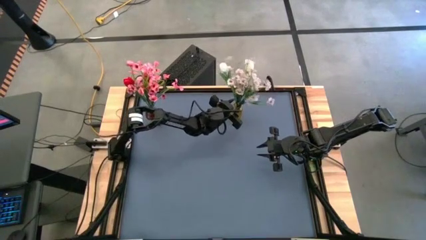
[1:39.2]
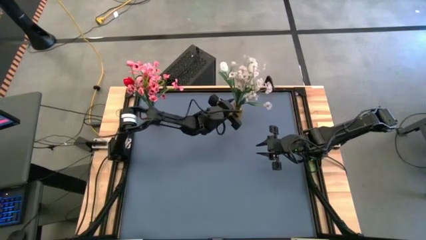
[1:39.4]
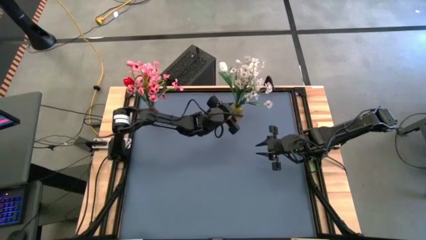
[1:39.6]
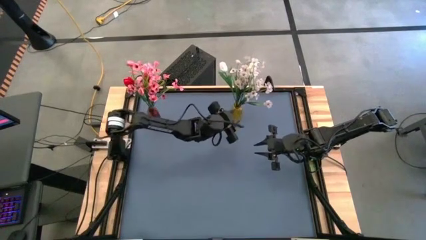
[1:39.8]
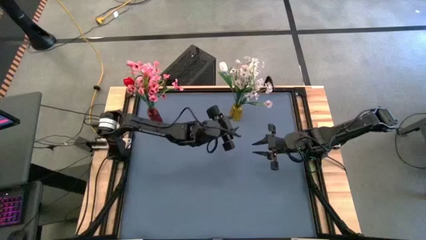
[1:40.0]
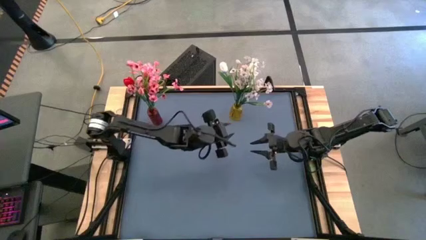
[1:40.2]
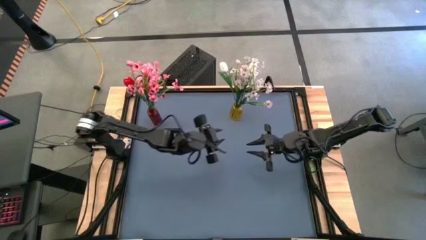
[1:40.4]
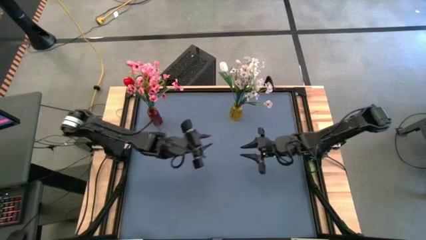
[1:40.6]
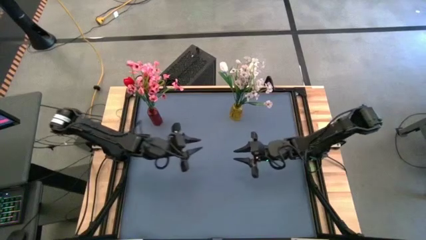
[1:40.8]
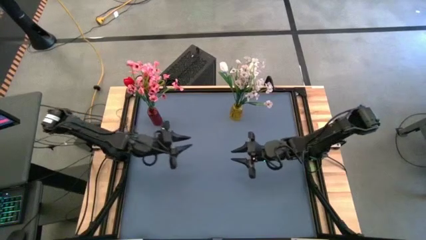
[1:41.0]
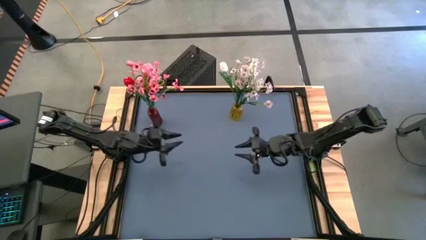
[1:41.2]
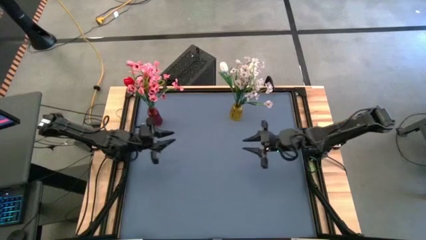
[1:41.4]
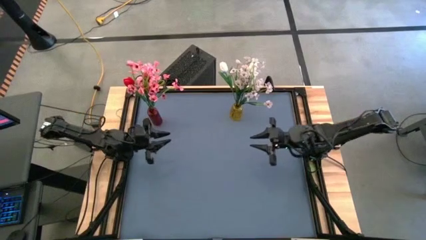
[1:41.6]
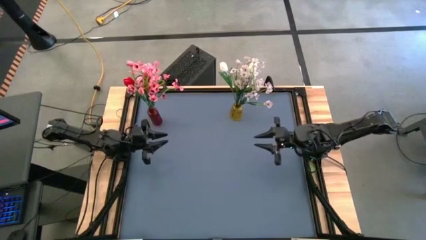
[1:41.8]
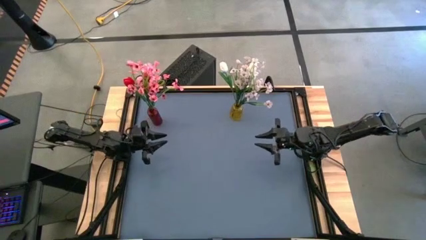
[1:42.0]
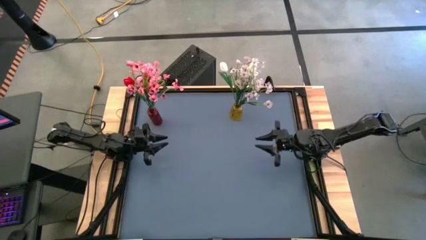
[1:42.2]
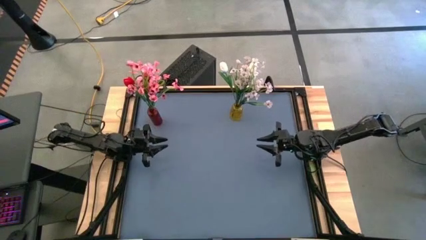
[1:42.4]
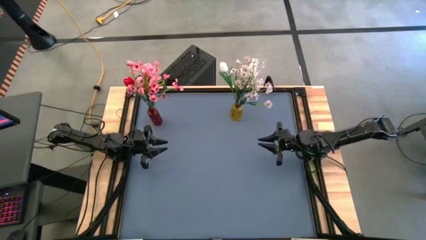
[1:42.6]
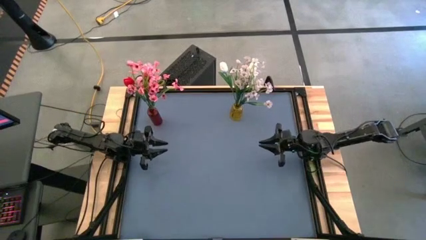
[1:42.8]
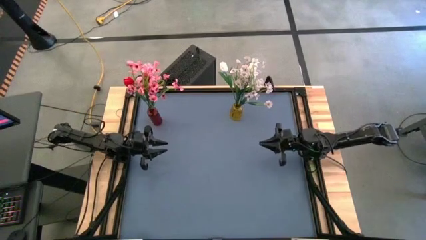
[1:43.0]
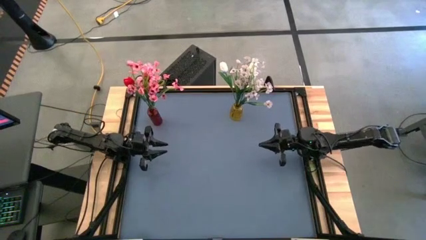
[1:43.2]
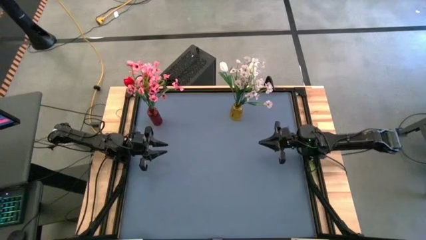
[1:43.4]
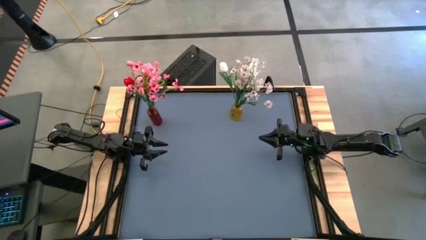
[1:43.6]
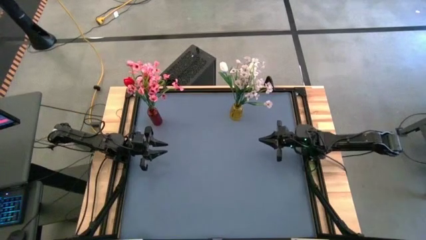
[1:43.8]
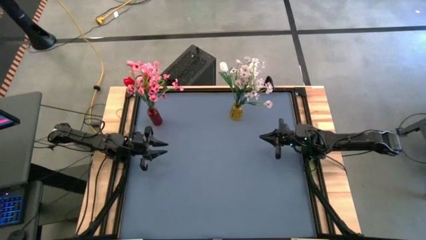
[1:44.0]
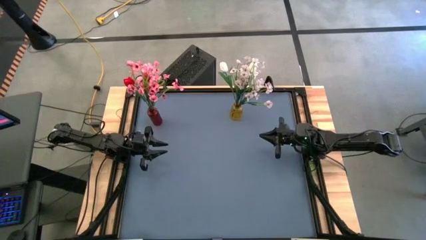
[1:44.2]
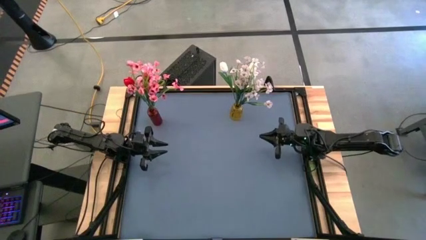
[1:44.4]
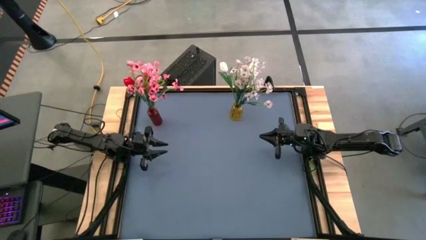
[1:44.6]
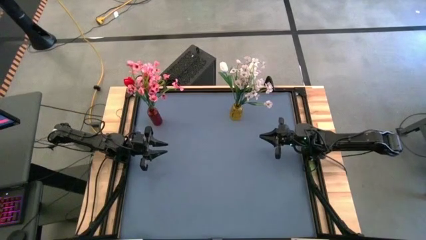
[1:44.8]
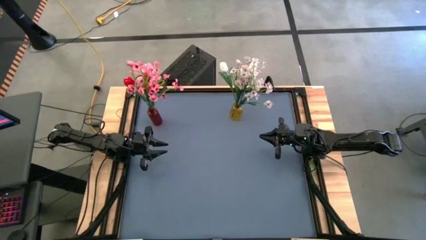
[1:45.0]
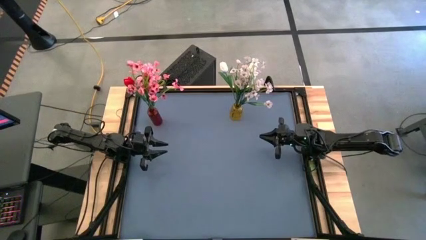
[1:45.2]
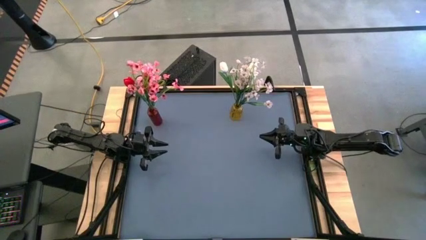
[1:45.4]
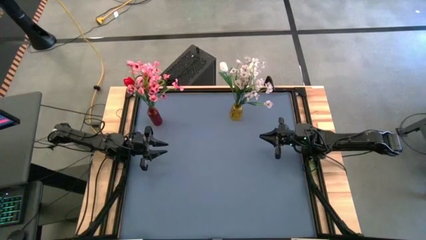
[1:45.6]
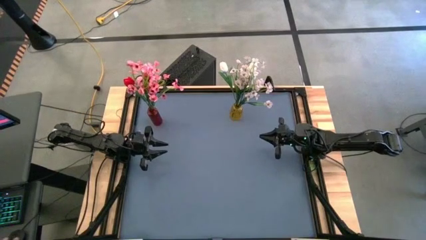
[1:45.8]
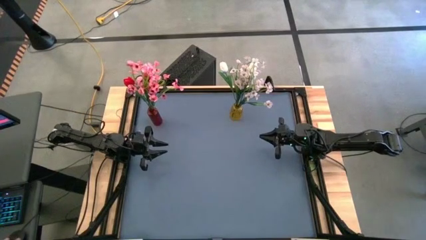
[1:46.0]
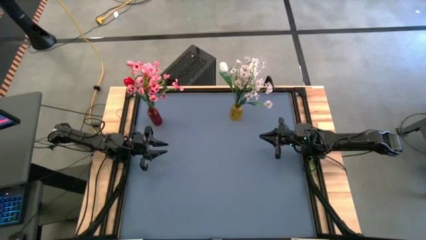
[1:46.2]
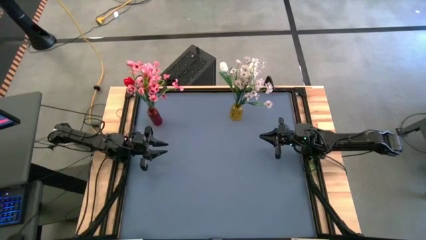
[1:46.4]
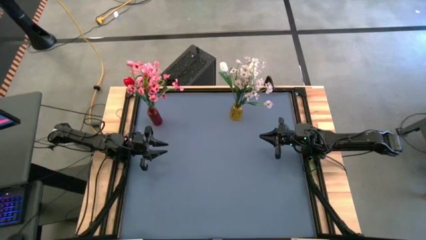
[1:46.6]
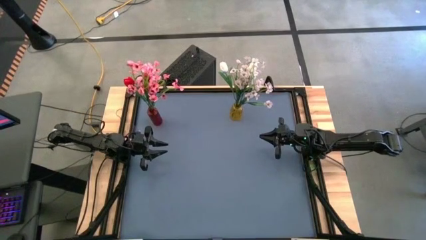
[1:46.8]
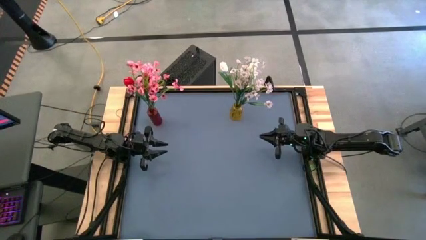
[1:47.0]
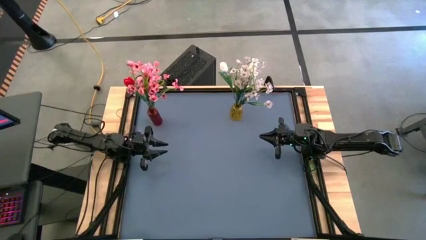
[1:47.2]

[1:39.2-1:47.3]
Task: Sort flowers into vase by color
Return to Home Position

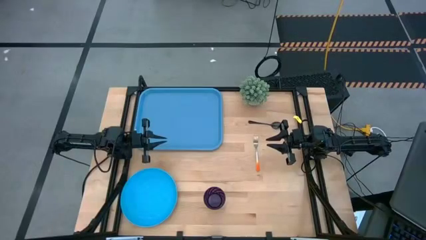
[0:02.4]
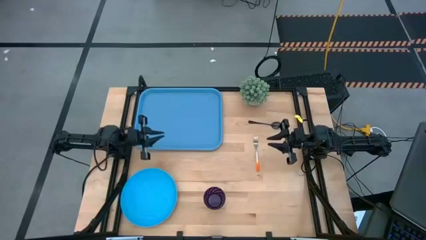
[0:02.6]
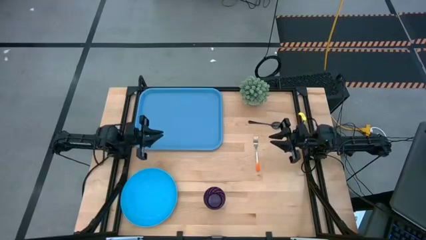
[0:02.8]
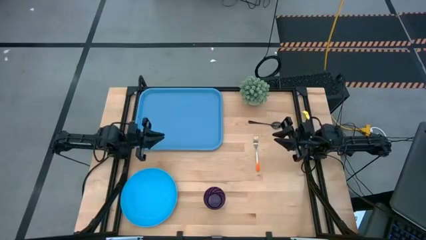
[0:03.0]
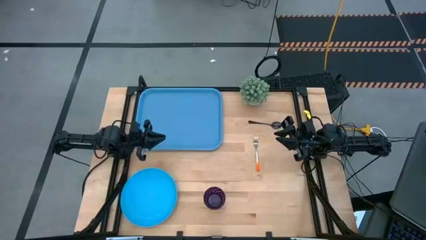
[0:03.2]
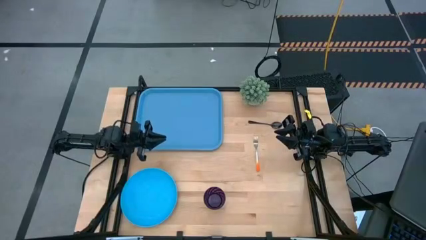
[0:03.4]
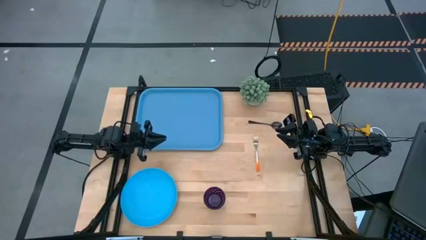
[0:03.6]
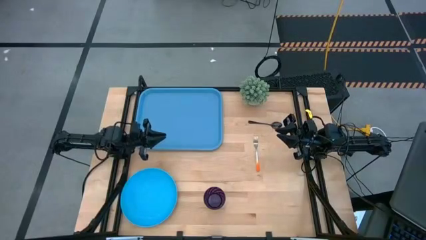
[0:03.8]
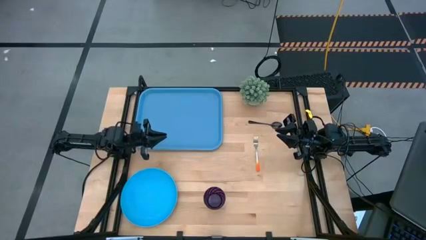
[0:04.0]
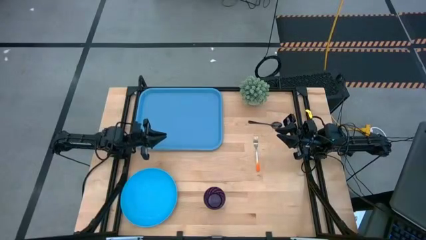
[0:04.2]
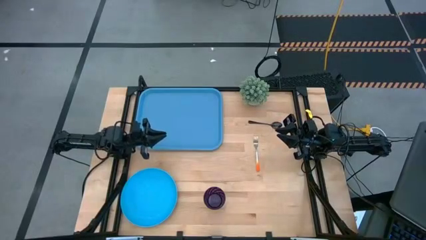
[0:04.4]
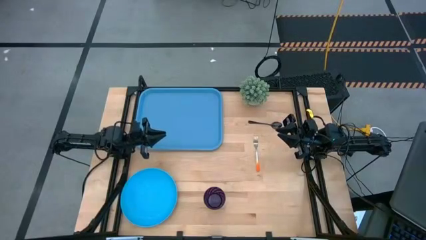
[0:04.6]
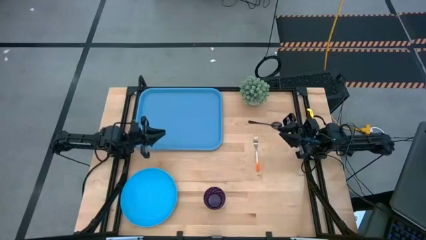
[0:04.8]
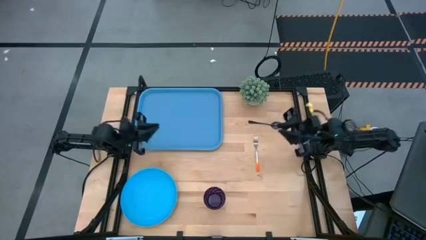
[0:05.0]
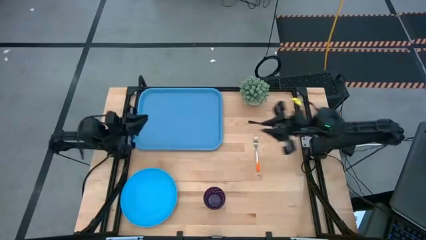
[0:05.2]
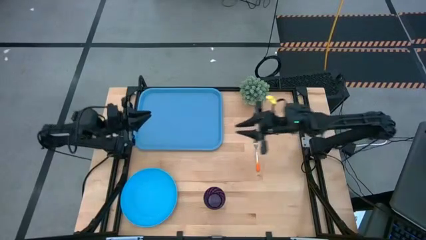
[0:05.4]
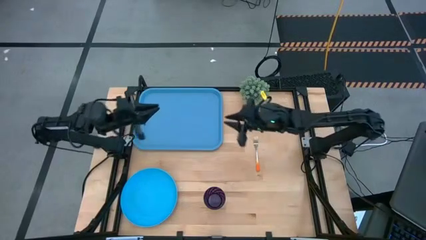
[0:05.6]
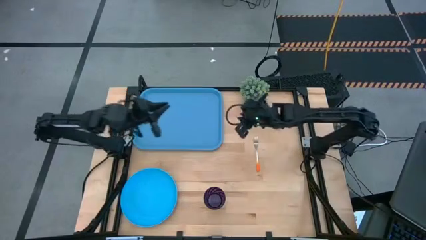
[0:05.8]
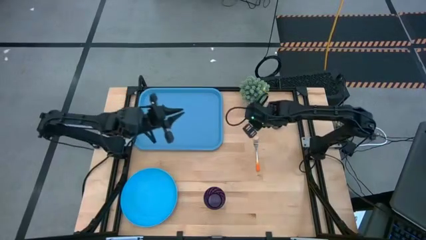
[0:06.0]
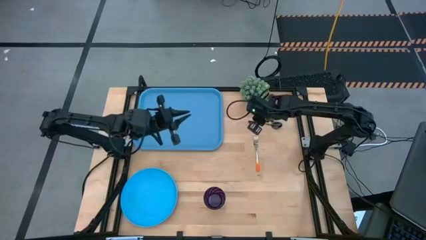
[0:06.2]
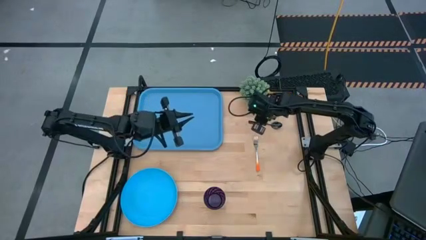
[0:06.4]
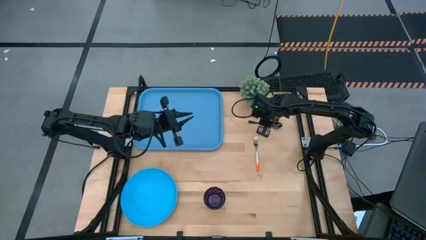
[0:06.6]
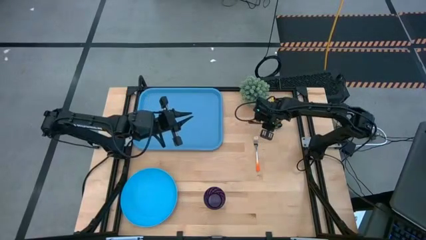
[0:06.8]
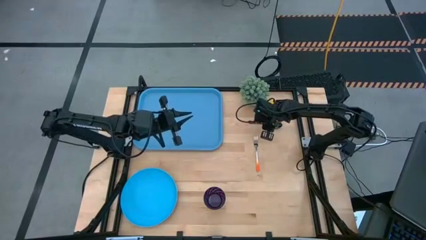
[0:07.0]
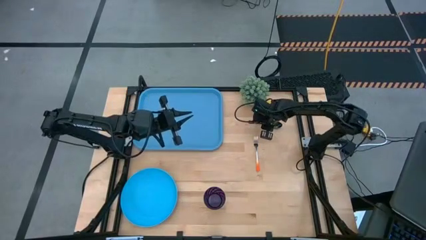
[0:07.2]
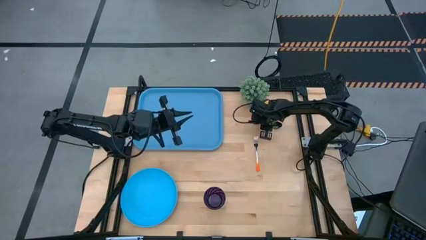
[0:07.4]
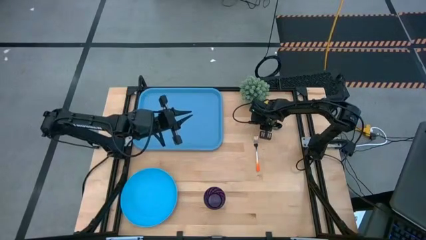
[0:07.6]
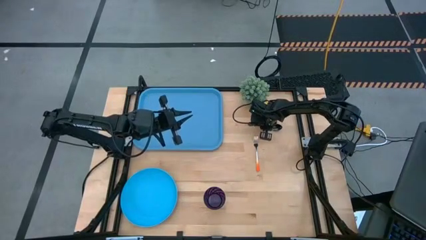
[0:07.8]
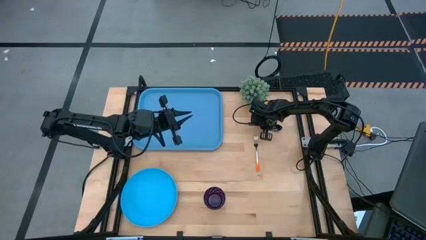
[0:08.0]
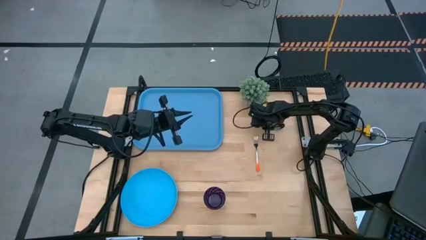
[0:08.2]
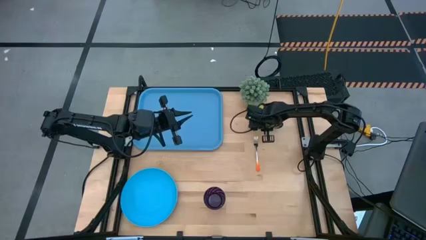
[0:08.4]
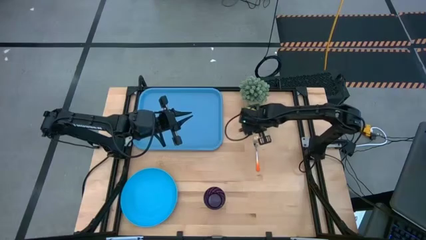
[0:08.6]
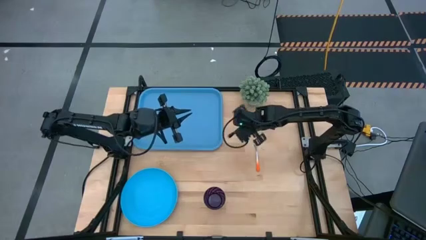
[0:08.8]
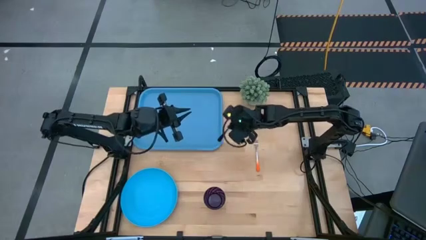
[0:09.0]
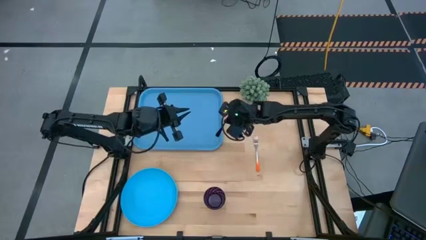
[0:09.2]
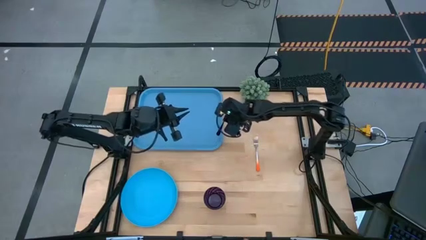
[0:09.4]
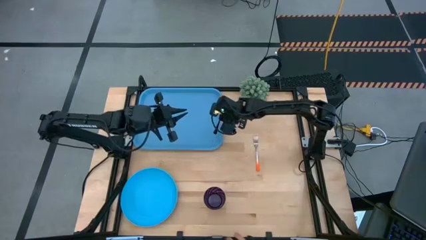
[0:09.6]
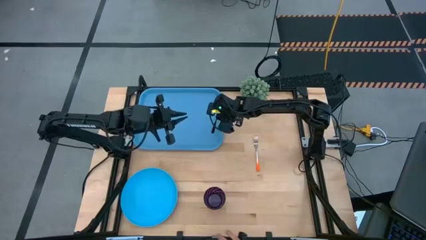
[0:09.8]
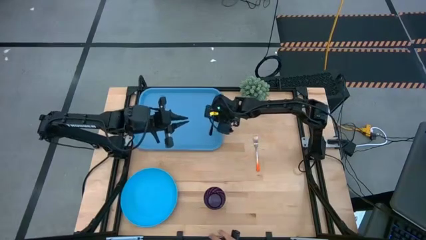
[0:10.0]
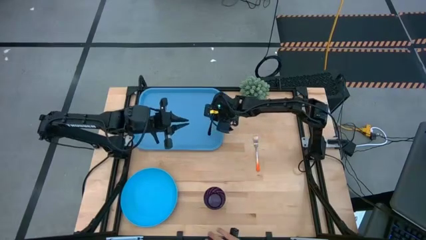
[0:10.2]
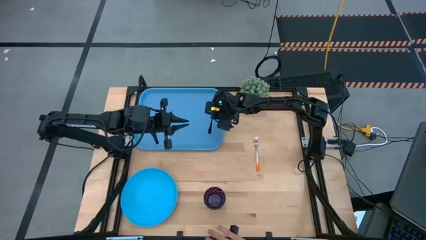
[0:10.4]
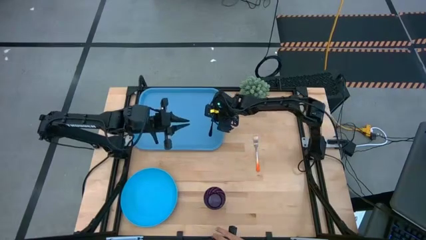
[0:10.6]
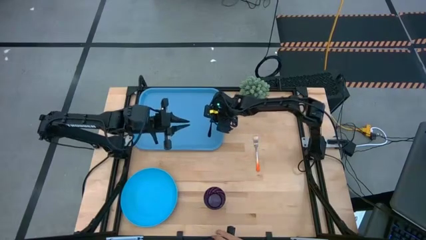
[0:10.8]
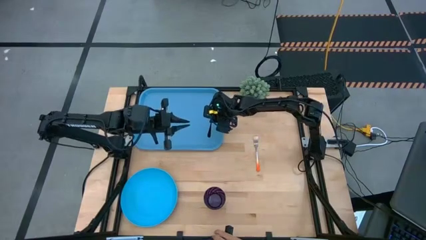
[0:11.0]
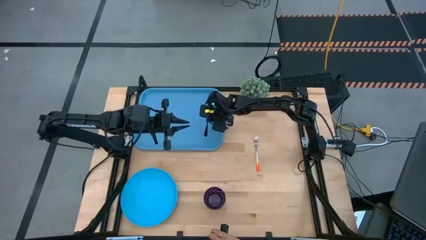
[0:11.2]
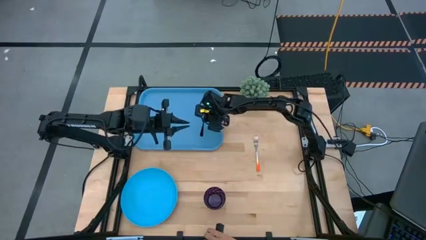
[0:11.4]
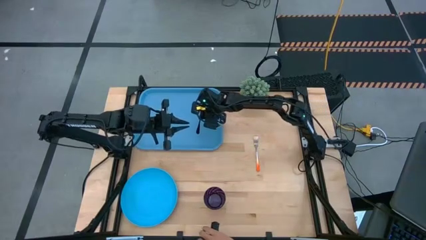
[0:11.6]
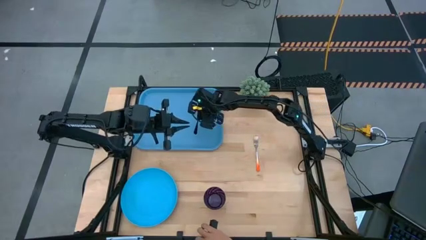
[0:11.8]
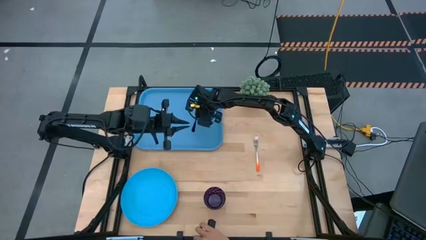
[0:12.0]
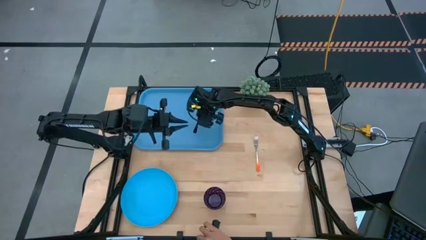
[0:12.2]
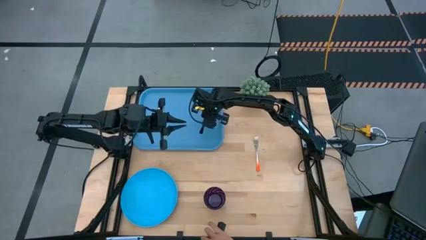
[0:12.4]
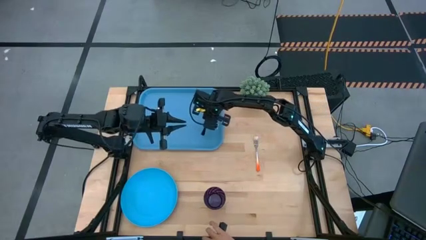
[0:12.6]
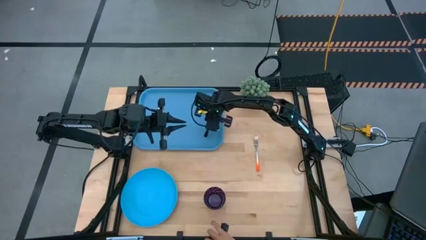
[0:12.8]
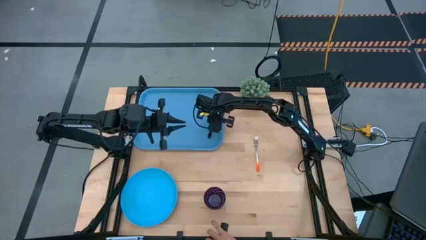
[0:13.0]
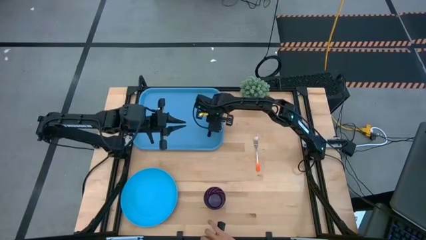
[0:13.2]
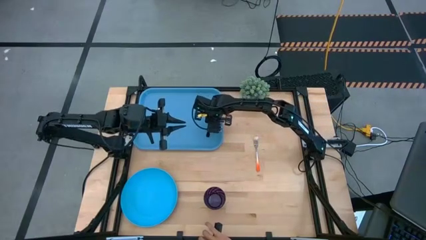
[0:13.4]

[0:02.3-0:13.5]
Task: Pick and place plate/cup/fork/spoon on tray
Put the black spoon onto the right side of the blue plastic serving tray
